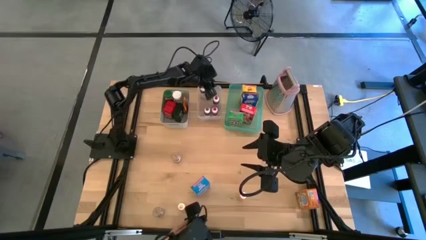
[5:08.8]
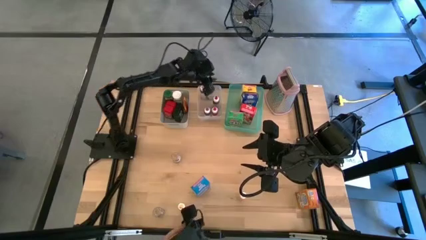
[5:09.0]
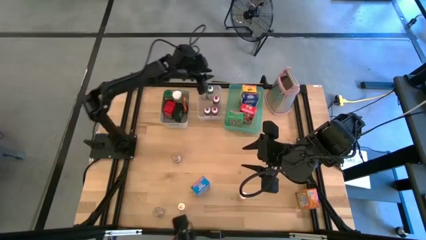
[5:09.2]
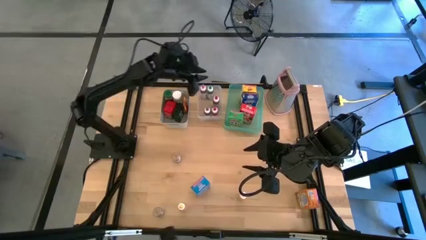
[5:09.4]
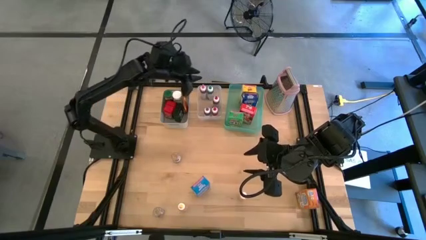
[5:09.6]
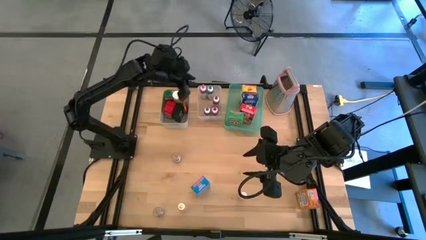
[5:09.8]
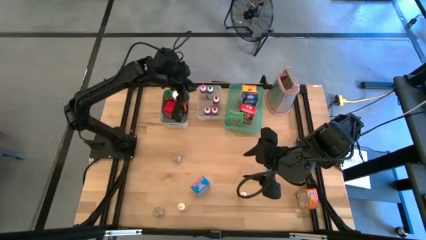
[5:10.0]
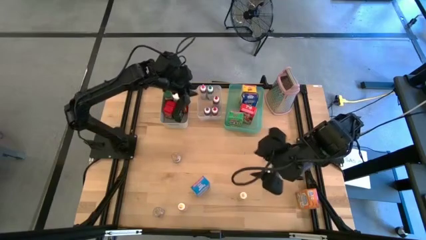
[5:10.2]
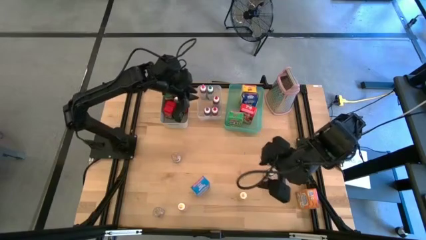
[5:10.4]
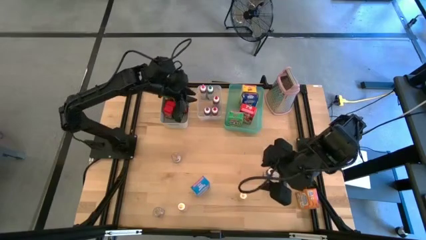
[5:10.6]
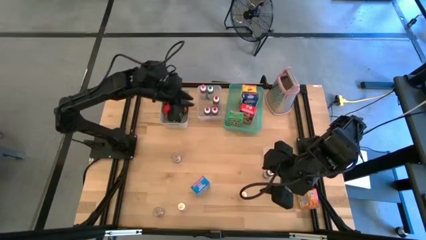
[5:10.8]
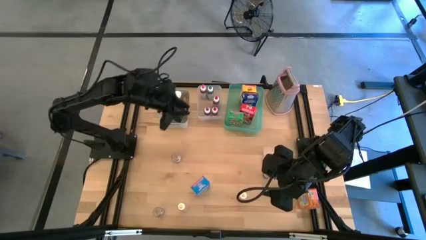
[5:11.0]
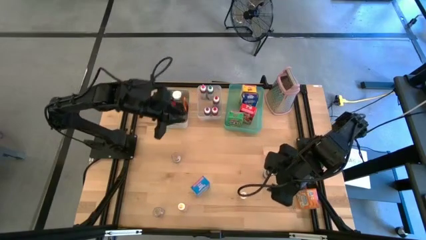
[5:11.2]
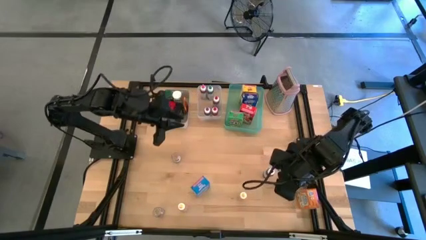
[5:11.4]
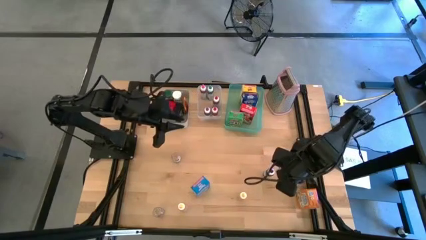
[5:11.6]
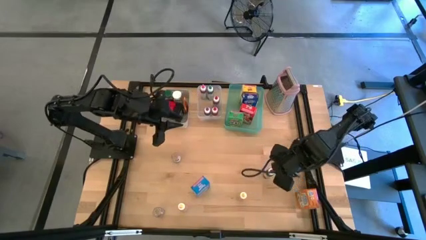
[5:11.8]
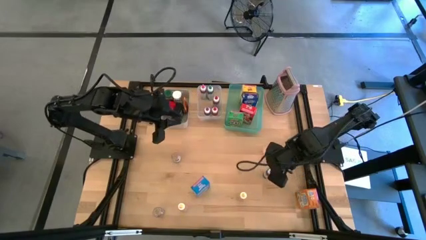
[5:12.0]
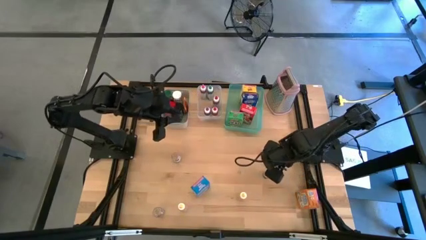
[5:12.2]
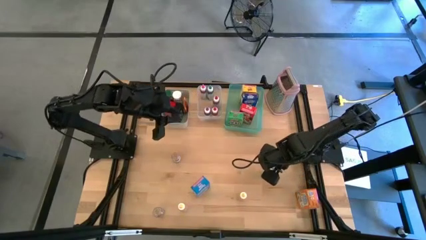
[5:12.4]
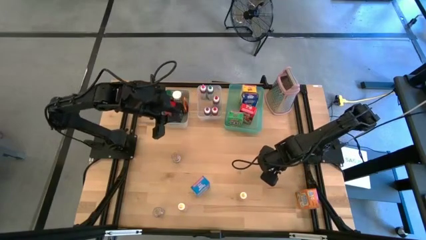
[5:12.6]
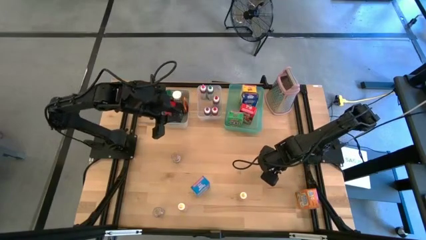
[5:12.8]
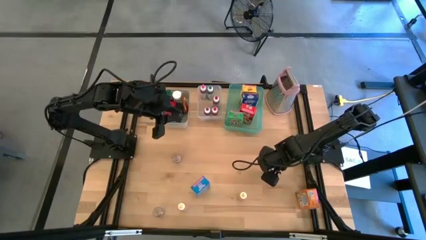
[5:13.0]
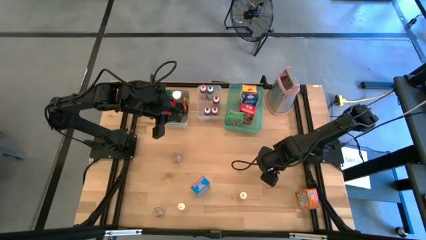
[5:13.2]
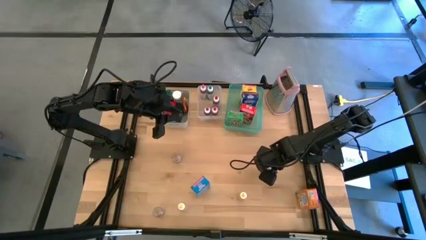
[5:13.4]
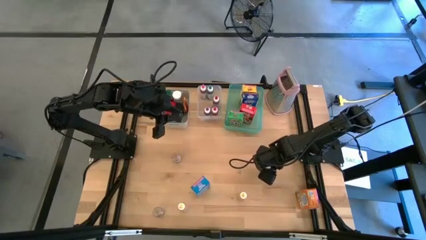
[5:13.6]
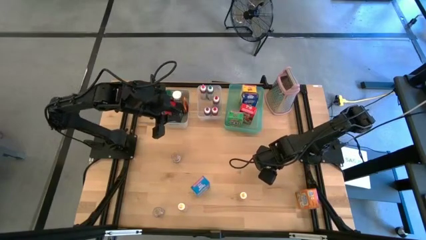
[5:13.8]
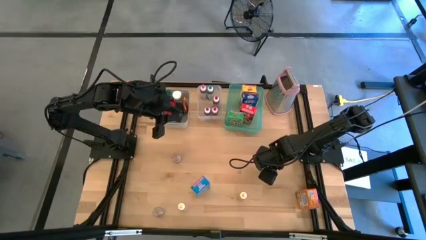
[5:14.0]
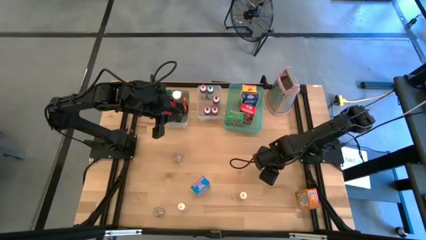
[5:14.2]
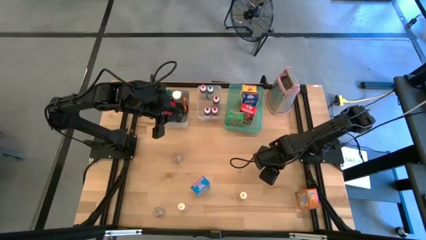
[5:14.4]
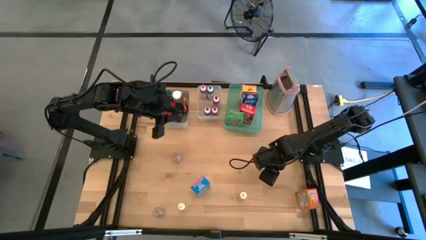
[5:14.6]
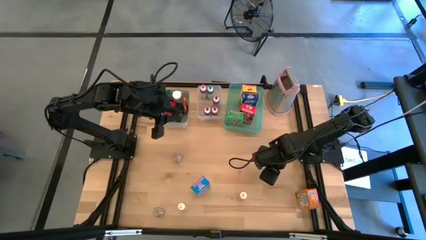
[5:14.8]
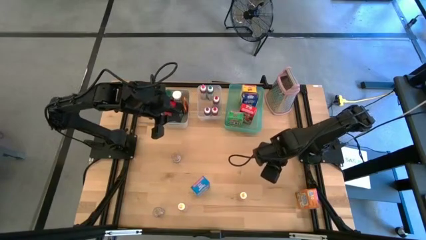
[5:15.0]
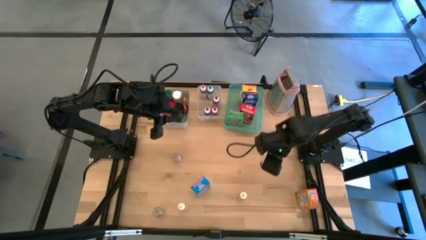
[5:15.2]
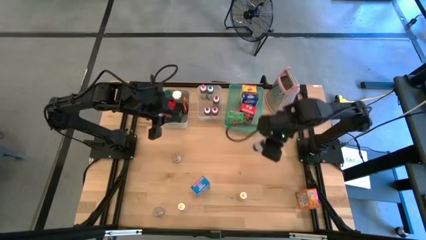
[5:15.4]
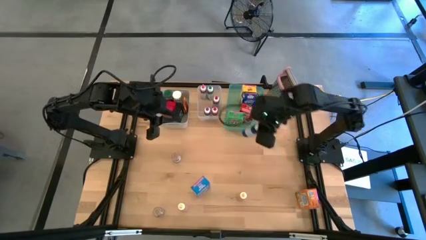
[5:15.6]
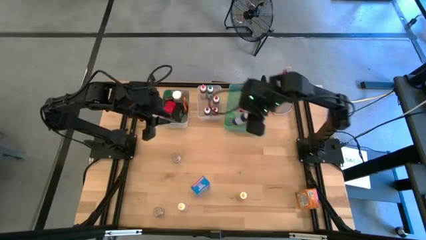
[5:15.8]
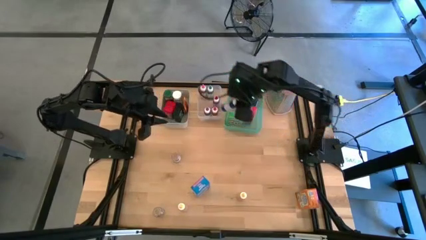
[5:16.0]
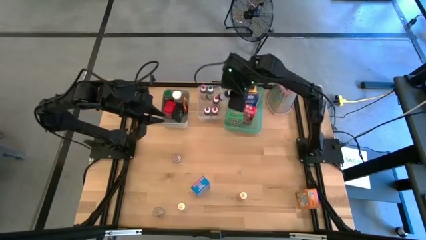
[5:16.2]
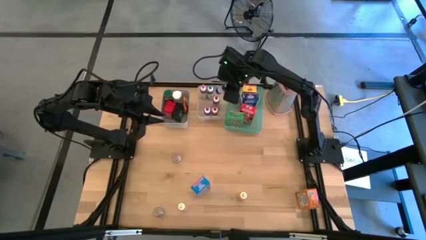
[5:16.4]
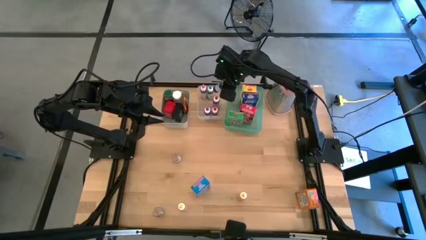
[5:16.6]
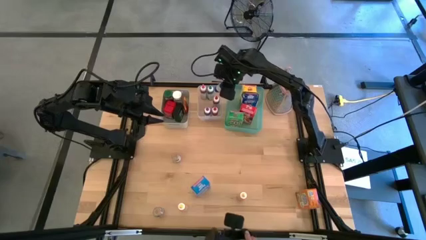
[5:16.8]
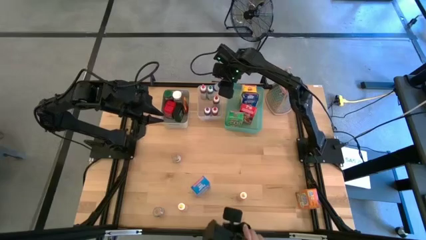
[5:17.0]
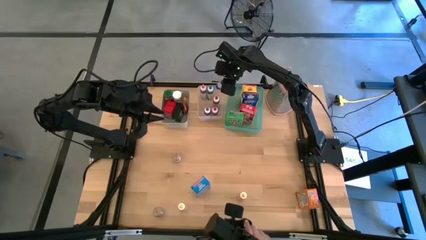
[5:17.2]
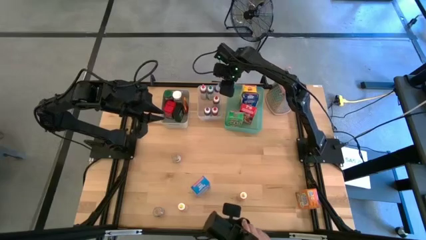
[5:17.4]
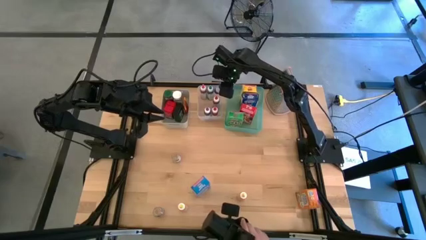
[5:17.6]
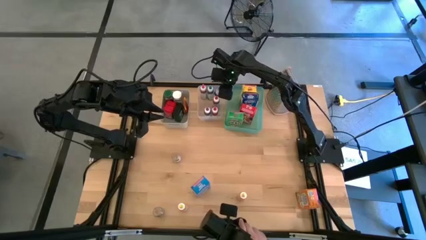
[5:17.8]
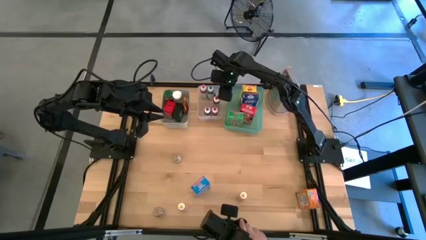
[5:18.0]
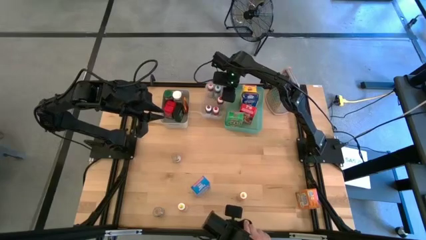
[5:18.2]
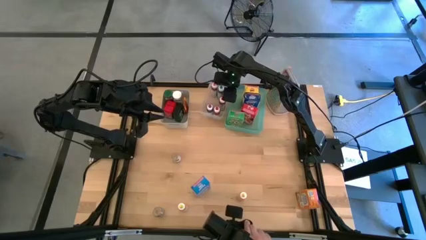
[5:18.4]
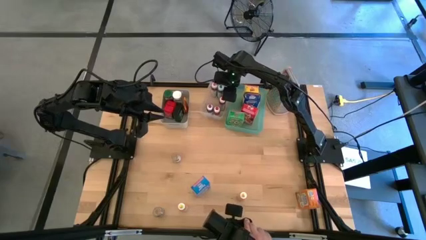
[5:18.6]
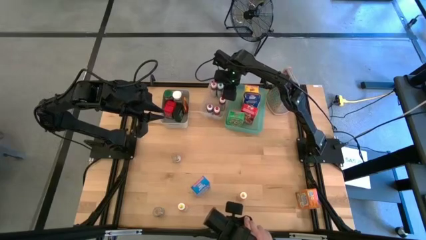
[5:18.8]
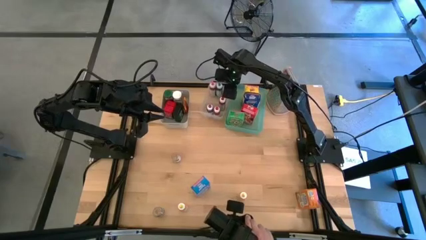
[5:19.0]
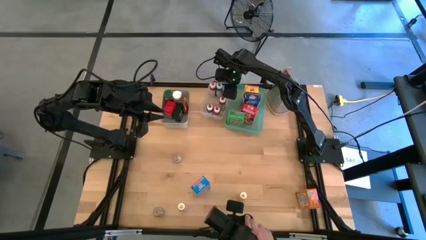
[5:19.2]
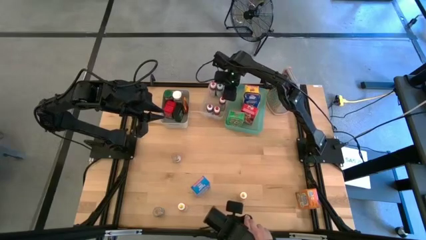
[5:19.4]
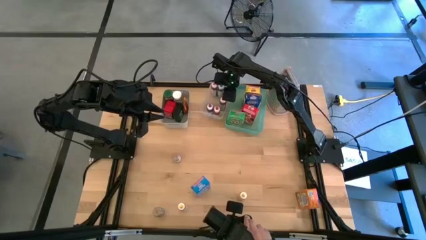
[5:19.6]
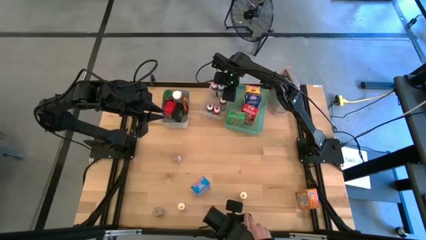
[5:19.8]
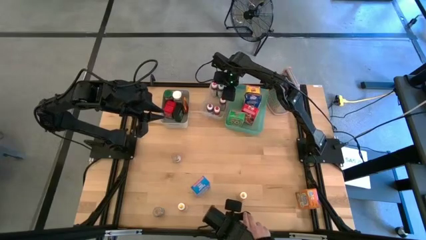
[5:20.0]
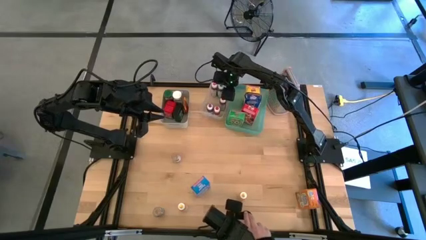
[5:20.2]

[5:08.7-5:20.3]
Task: Pick & Place Kitchen Items
Put the blue food coloring bottle into the transparent bin
